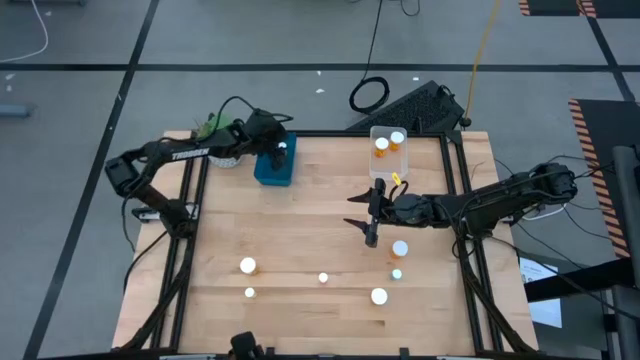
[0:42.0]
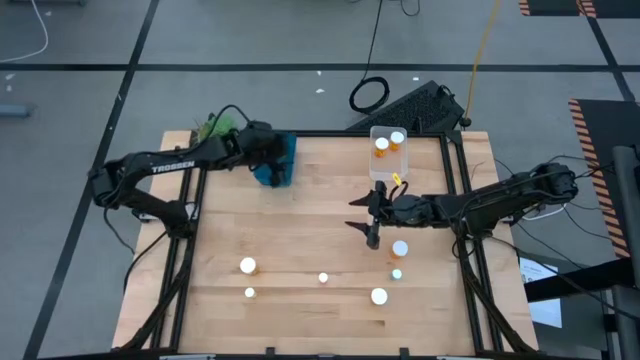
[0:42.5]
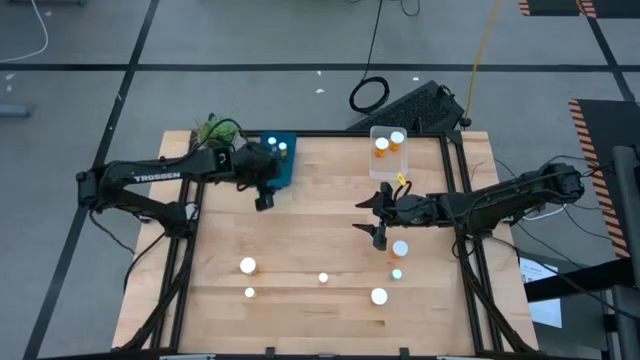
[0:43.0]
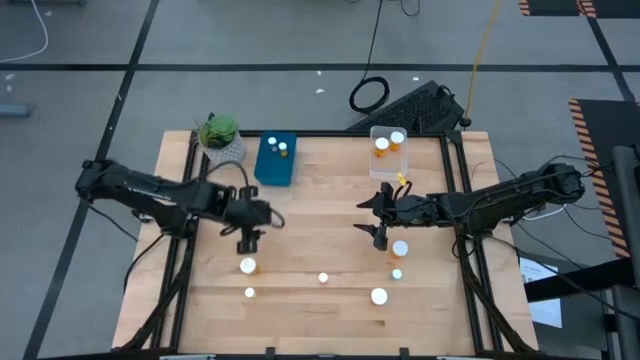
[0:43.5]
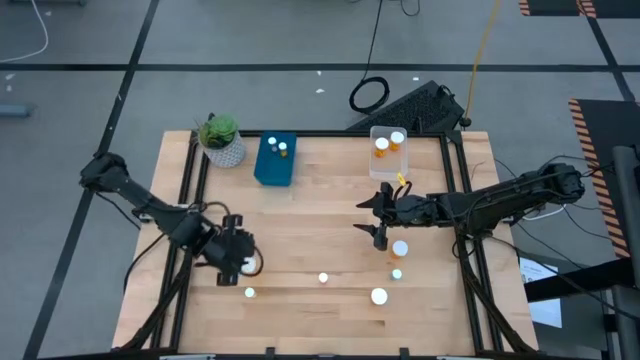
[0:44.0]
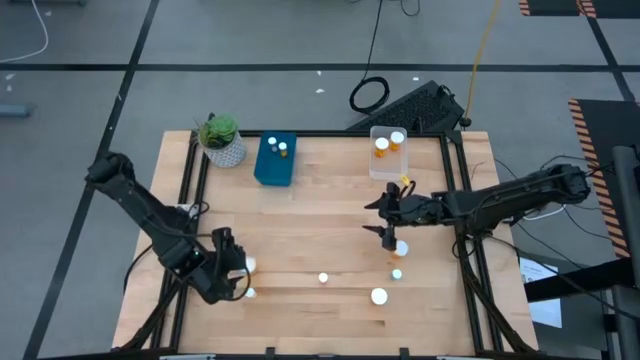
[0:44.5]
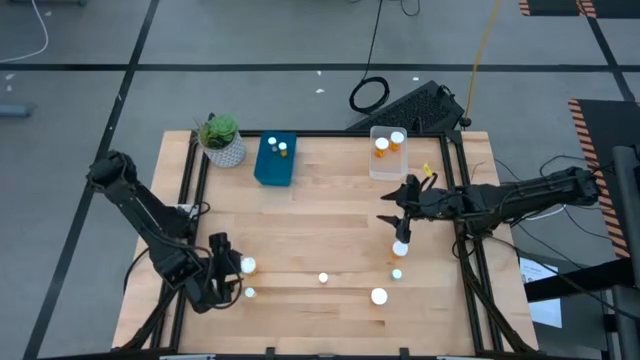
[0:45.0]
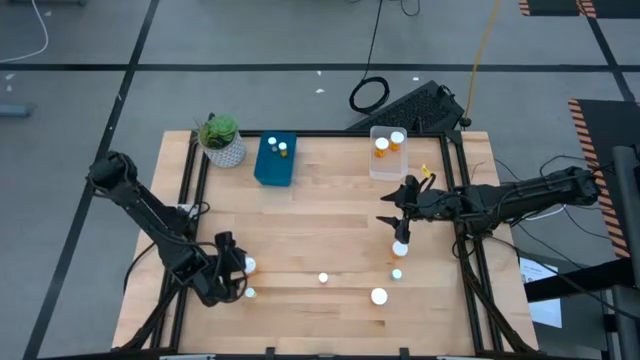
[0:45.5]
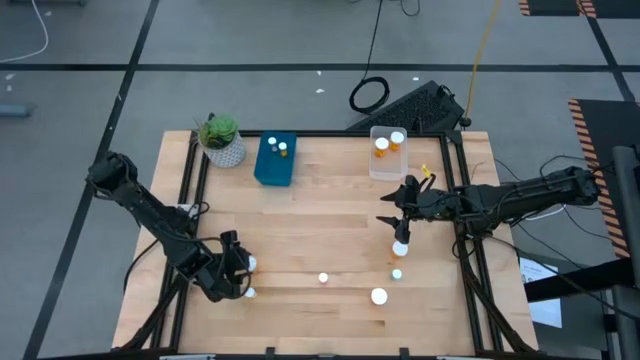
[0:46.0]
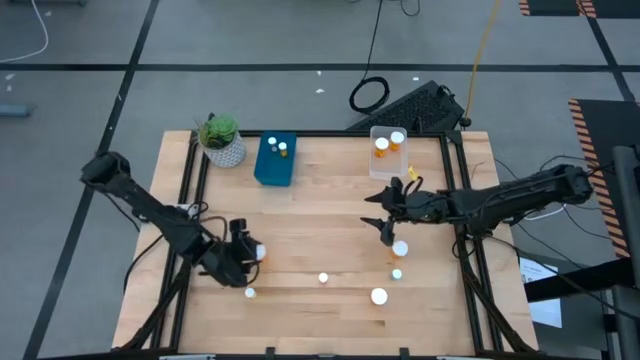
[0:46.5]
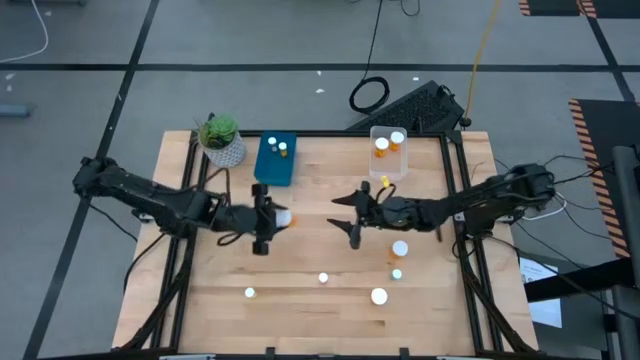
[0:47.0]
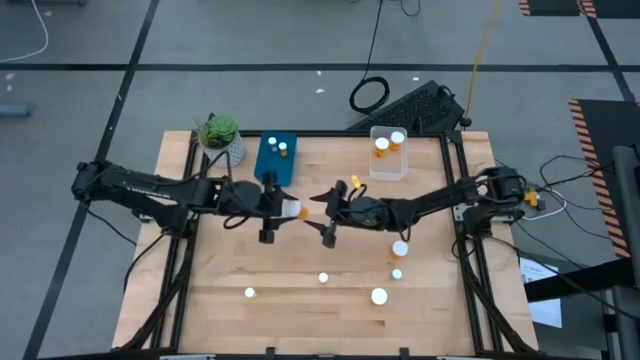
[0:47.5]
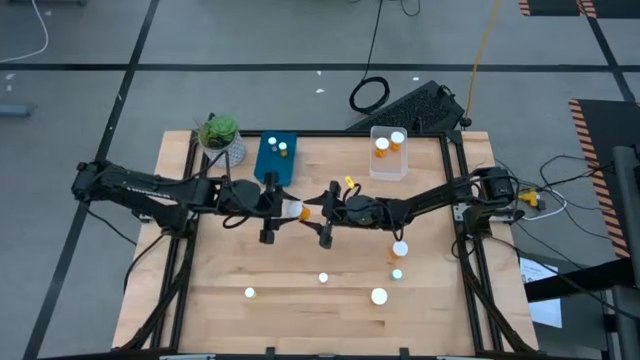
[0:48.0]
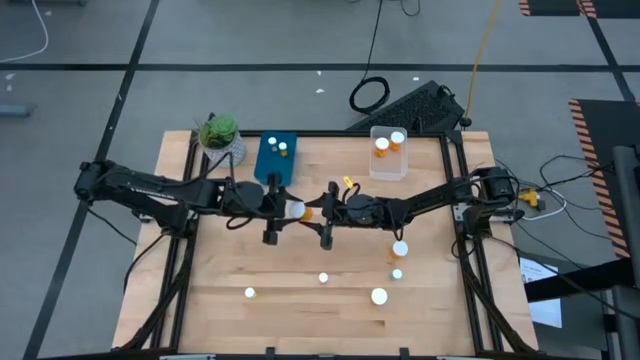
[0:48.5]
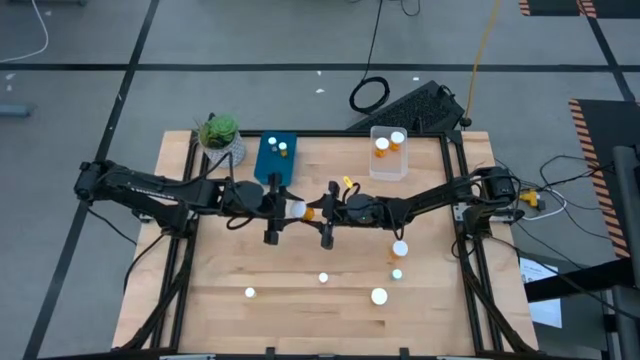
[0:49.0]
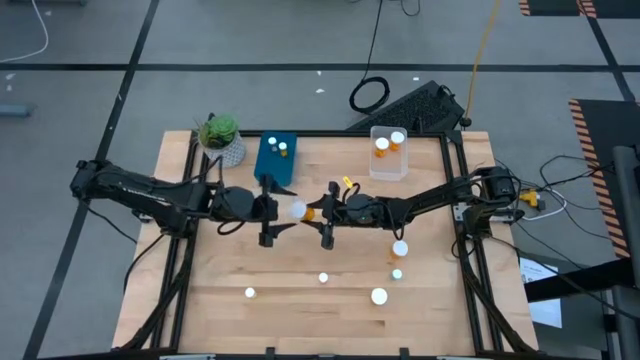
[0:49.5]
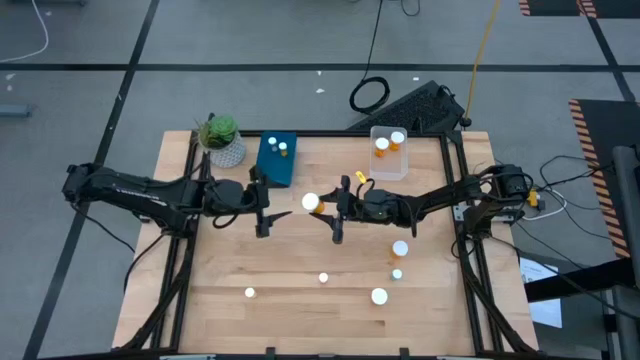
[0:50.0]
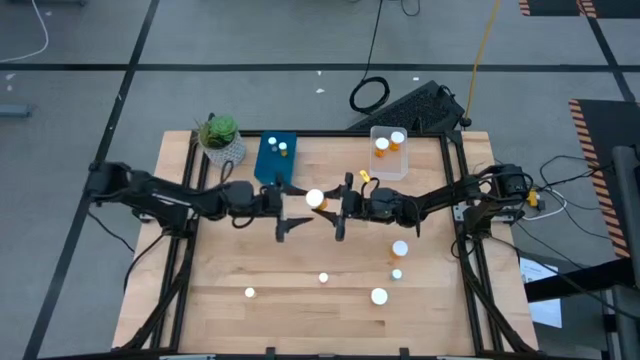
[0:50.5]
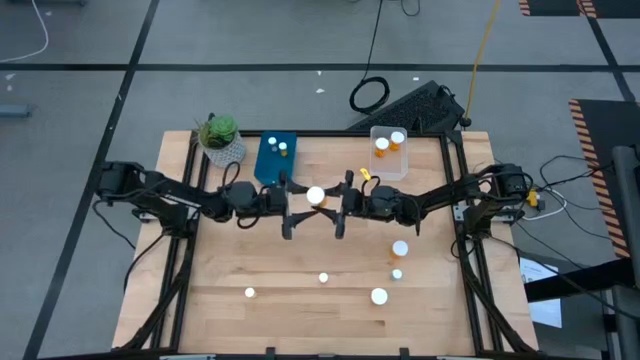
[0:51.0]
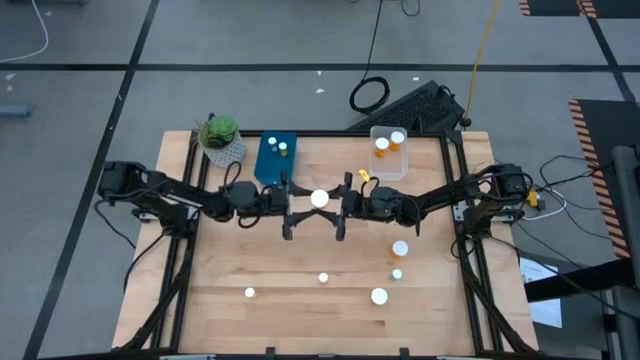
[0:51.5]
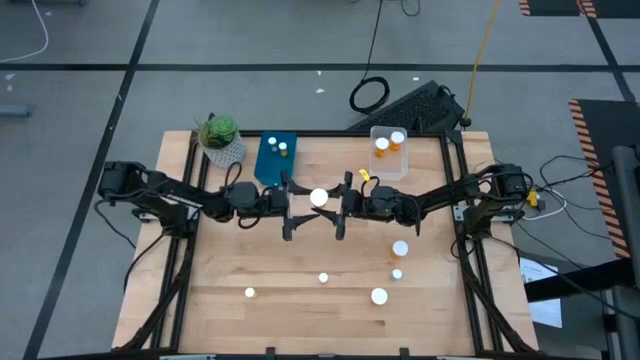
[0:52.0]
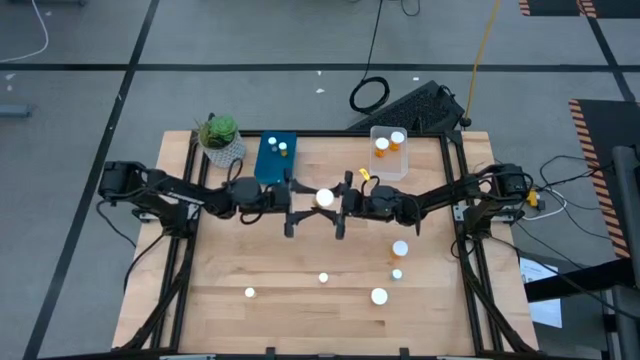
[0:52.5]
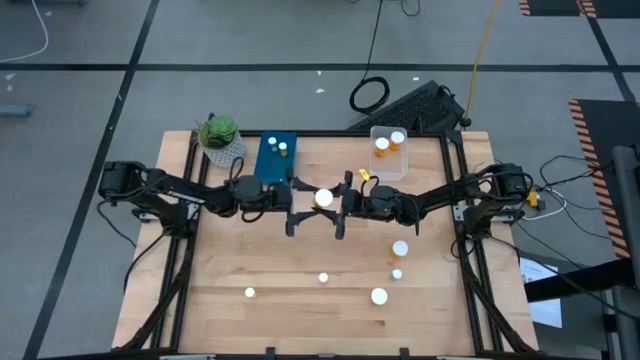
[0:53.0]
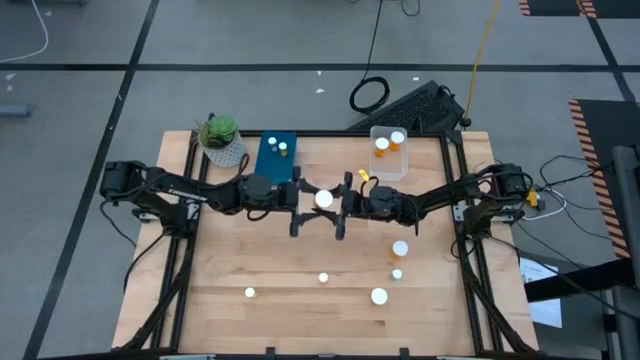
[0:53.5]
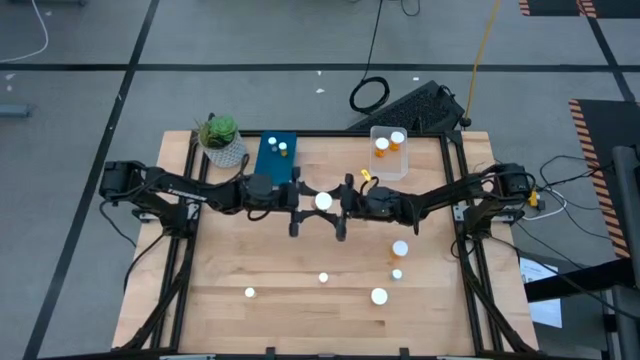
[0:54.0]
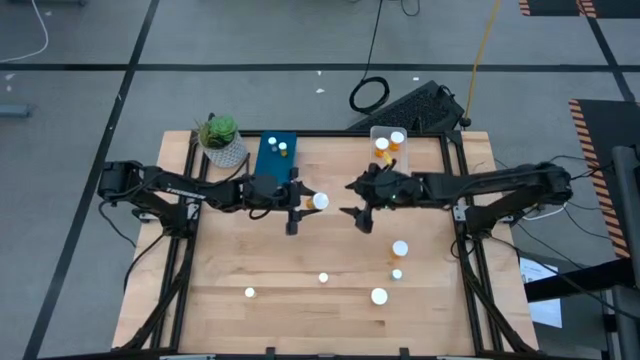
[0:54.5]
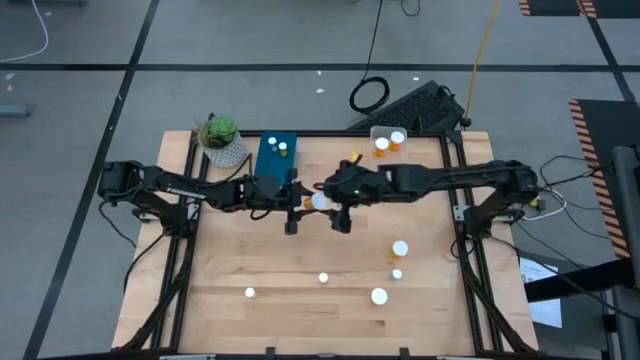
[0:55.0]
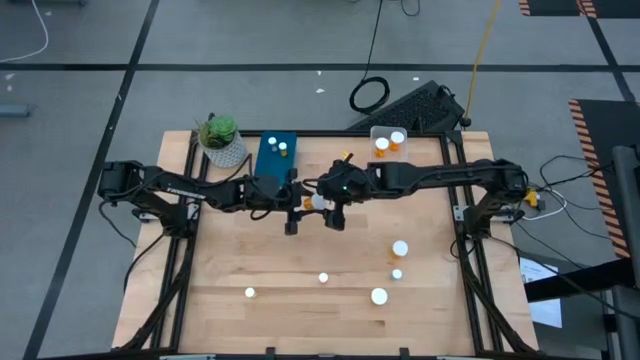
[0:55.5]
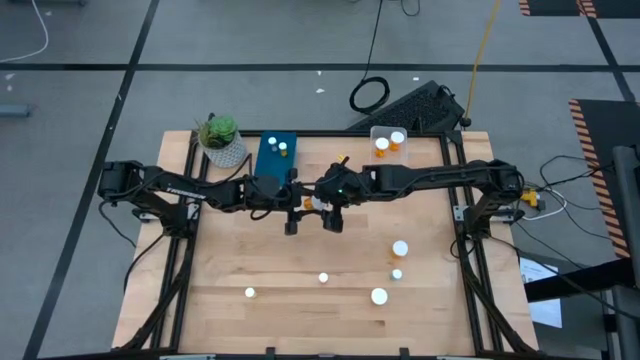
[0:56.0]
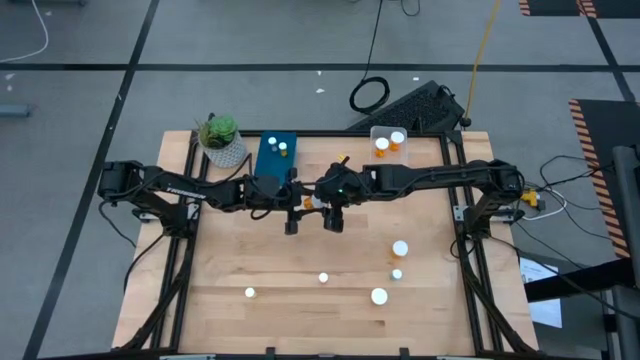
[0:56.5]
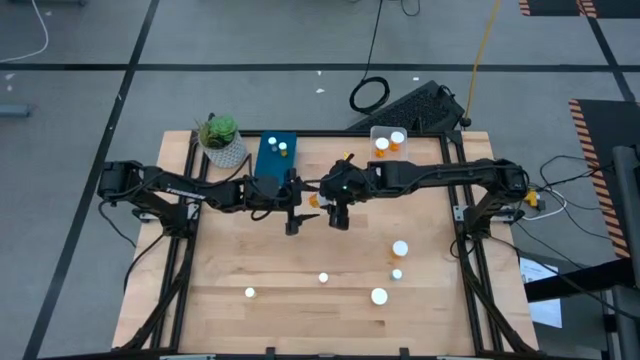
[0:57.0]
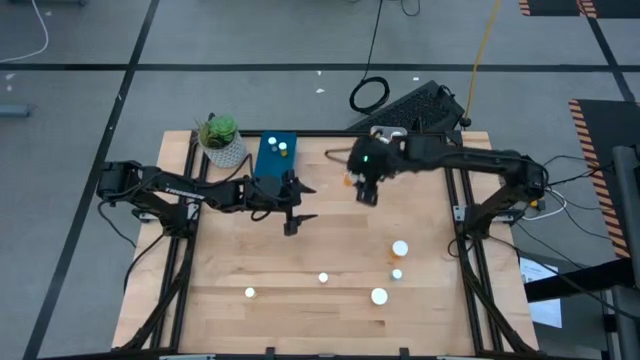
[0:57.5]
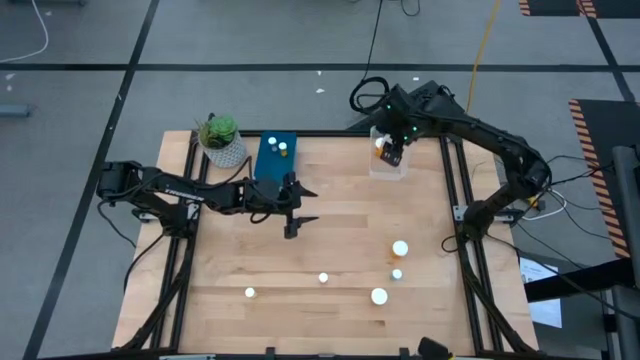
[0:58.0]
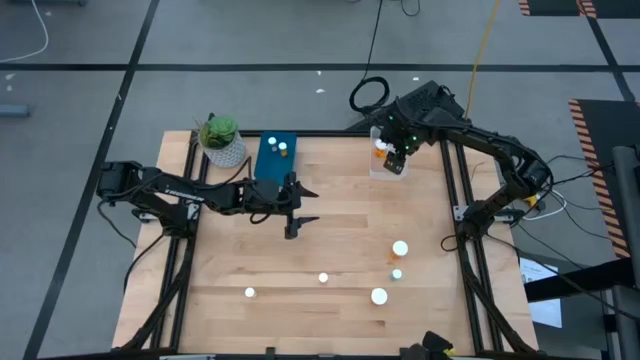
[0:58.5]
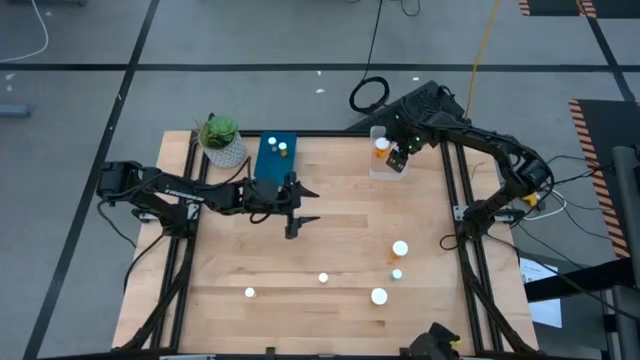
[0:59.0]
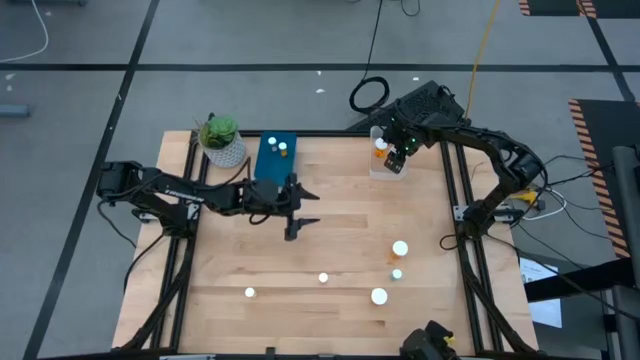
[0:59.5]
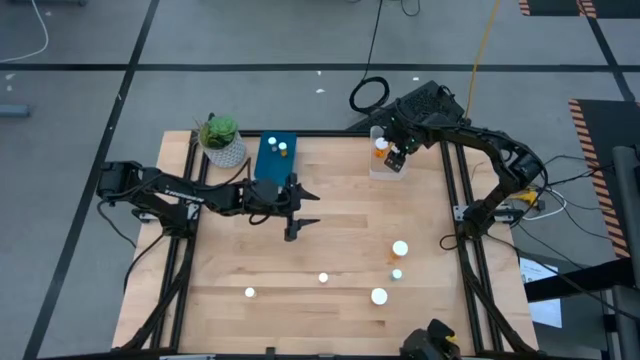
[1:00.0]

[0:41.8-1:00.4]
Task: Pick and place medicine bottles into bin by pill shape (circle, oval)
Put the orange bottled capsules into the transparent bin
